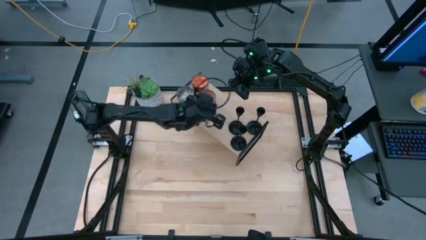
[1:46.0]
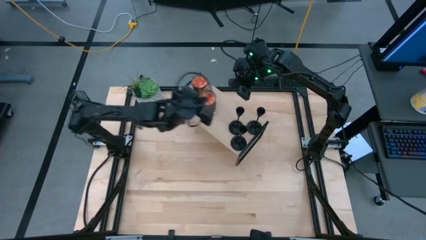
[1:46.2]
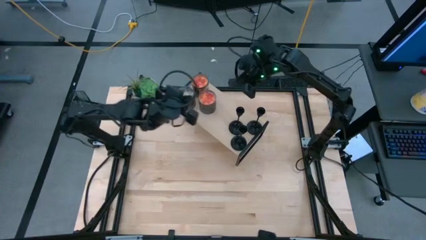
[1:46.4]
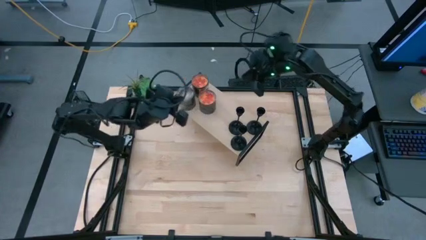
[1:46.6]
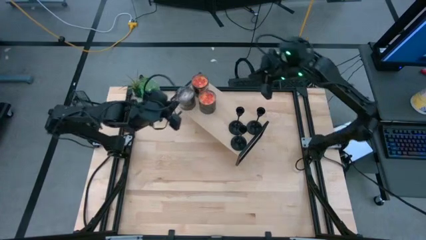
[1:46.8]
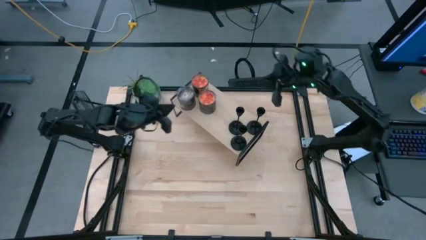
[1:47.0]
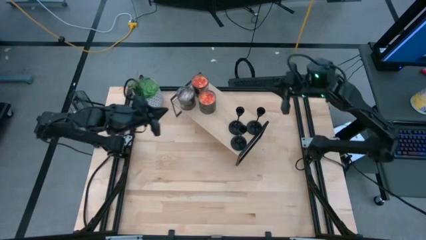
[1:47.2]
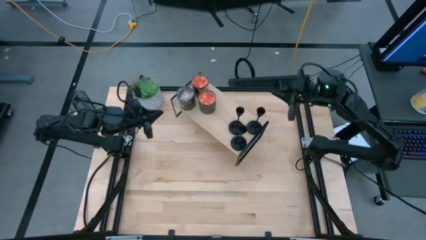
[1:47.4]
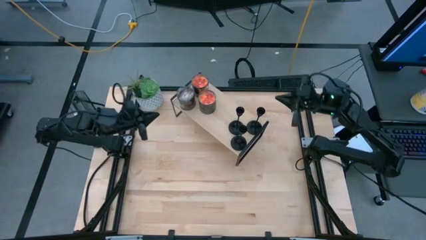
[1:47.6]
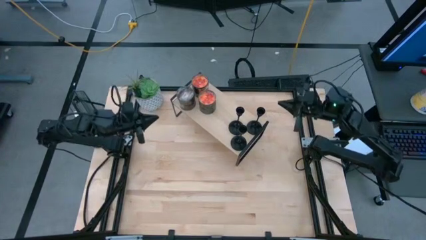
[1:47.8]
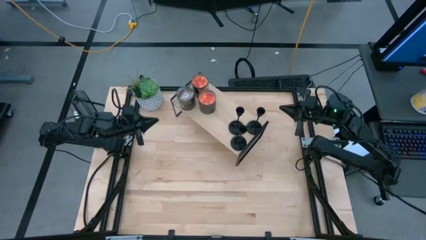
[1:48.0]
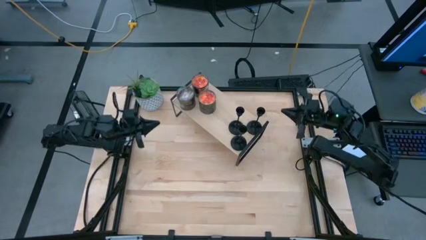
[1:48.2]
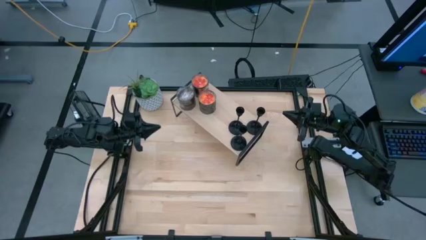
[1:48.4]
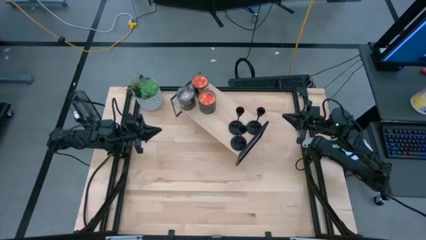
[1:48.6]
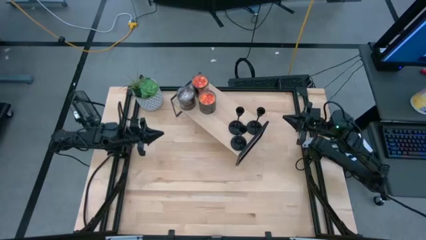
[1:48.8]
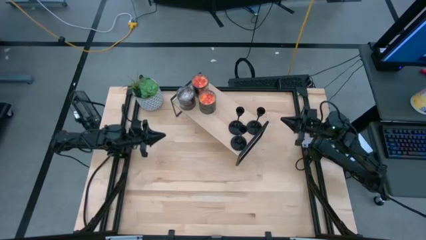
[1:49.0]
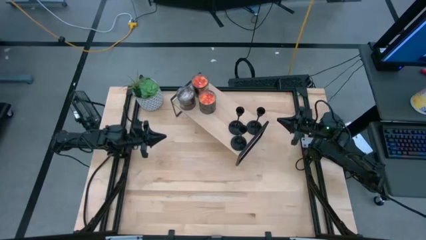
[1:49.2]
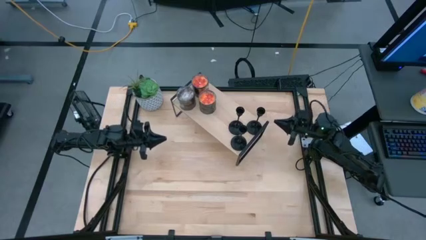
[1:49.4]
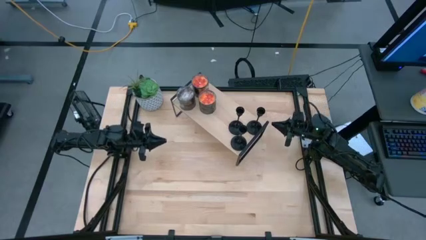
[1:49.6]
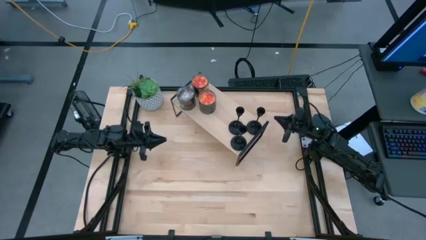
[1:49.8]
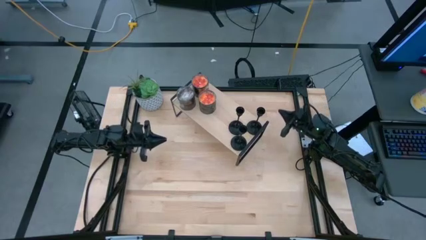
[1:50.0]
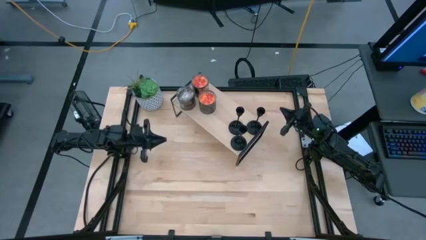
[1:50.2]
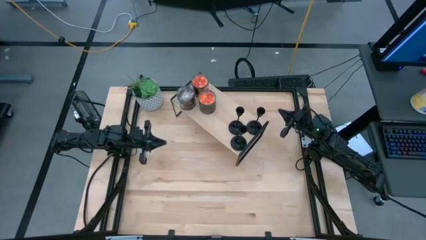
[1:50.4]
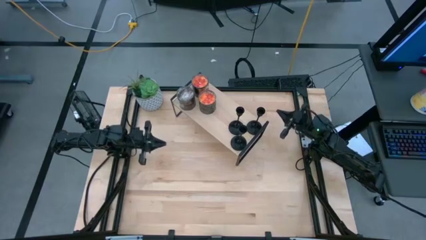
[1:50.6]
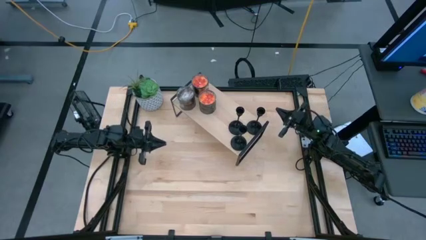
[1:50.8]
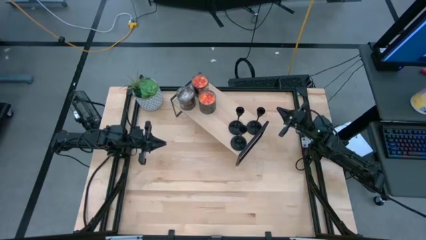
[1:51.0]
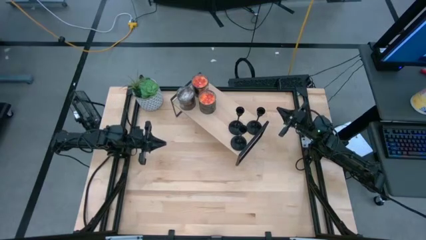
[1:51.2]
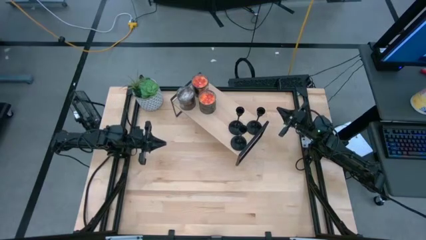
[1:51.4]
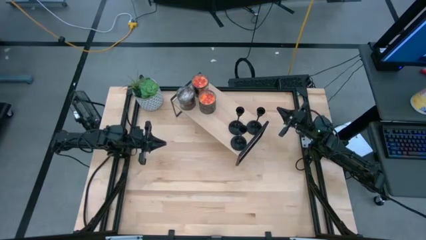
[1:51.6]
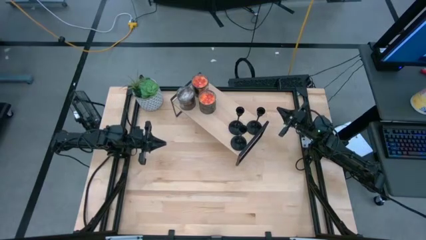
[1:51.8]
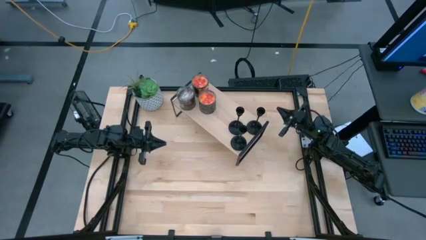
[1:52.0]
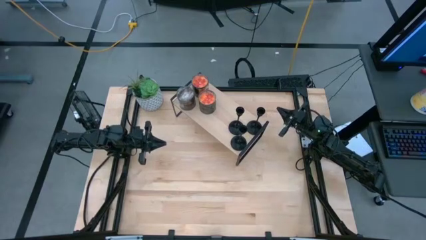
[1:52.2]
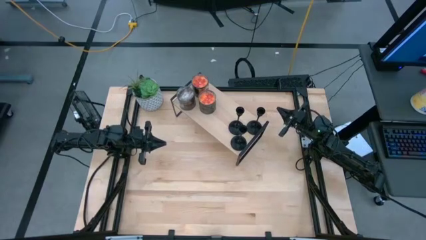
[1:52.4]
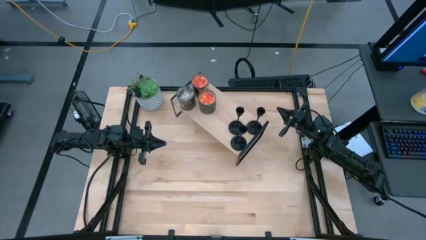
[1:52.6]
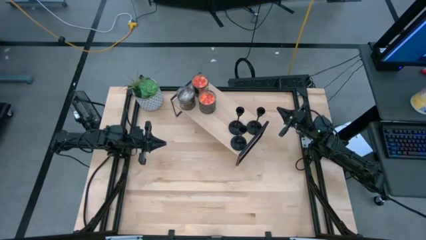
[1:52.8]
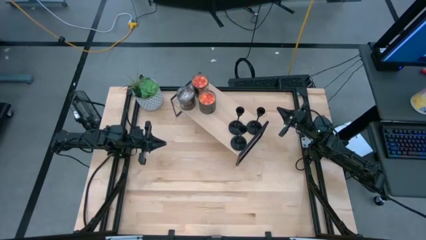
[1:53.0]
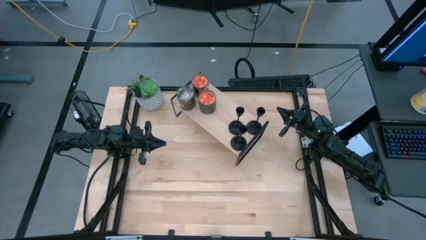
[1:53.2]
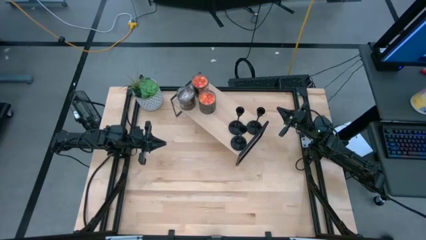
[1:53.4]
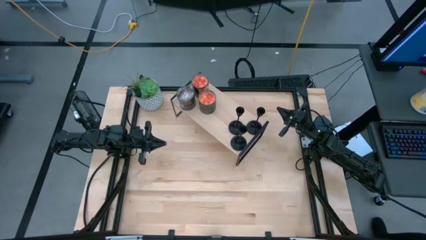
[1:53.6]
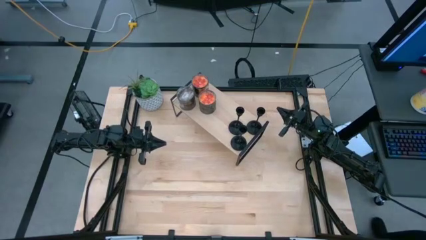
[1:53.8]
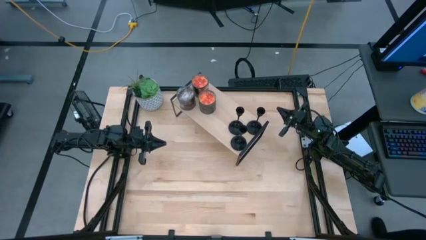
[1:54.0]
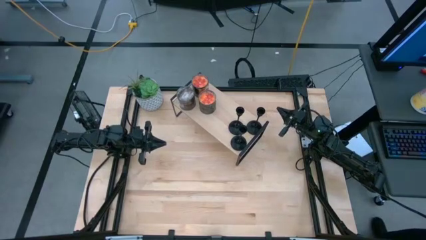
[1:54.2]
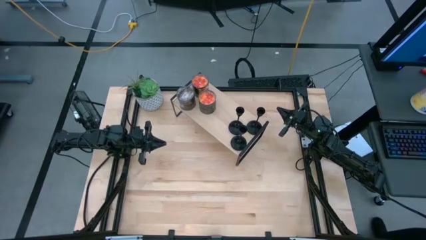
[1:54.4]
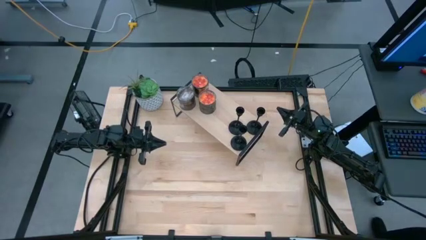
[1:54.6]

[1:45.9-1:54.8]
Task: Pick & Place candle stick holders
Return to Home Position

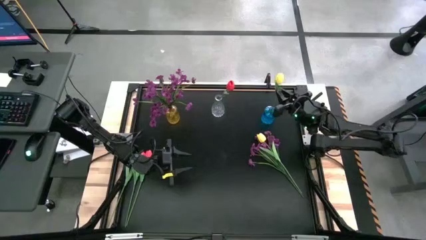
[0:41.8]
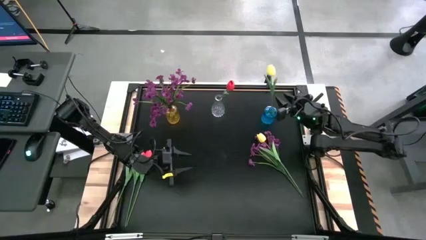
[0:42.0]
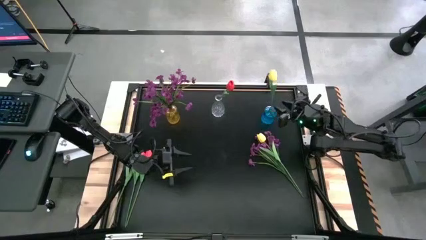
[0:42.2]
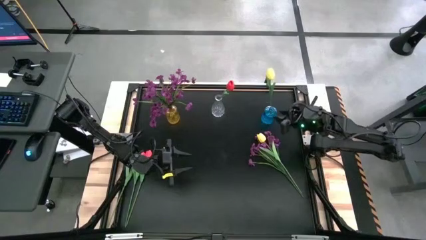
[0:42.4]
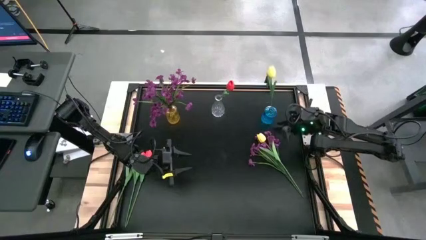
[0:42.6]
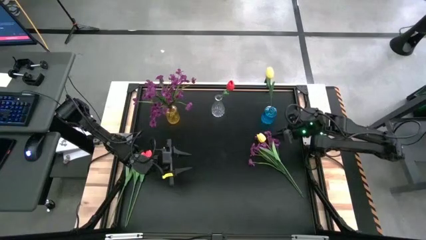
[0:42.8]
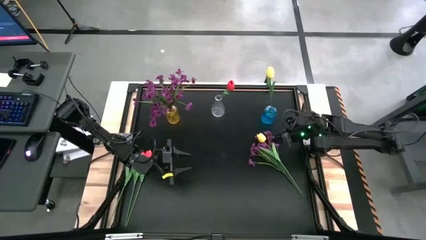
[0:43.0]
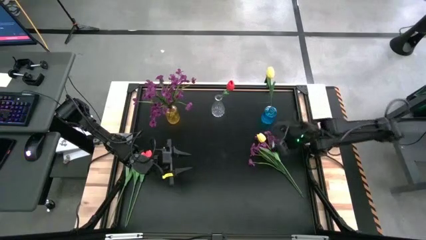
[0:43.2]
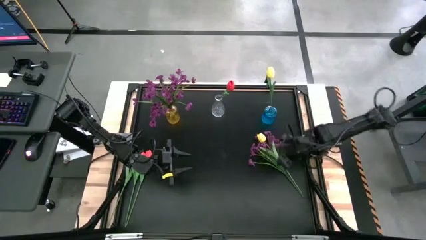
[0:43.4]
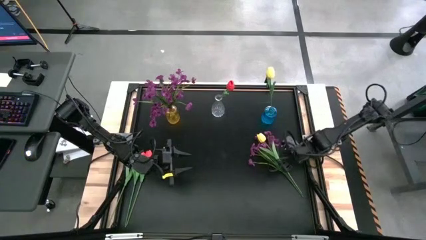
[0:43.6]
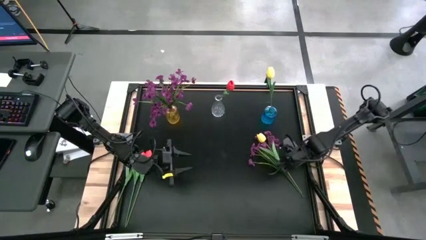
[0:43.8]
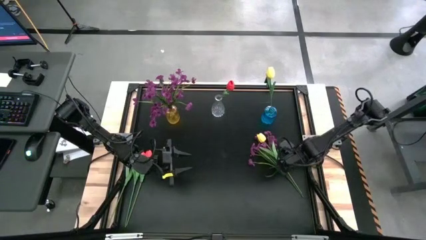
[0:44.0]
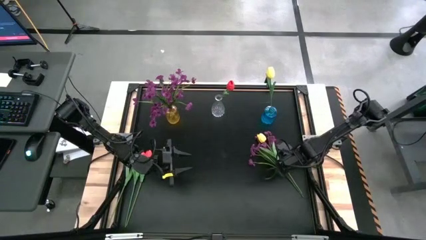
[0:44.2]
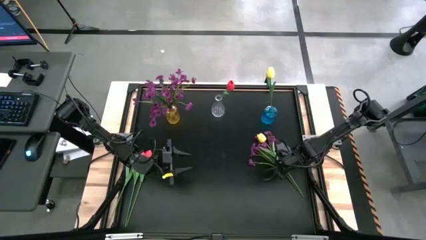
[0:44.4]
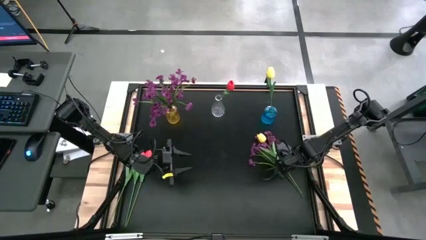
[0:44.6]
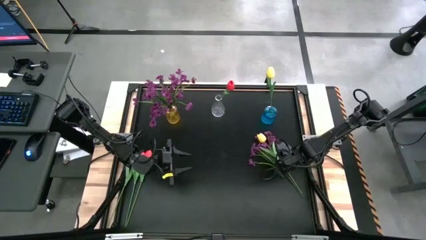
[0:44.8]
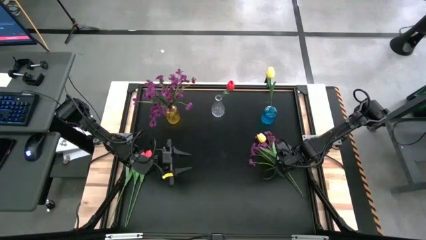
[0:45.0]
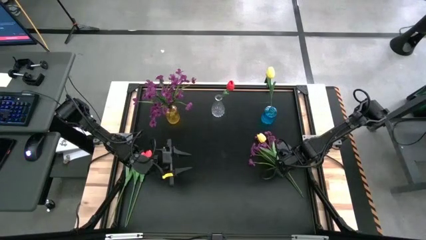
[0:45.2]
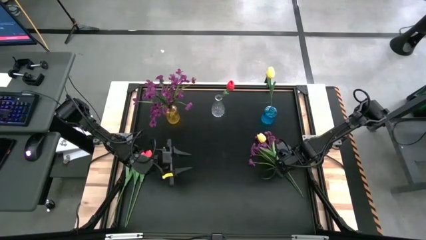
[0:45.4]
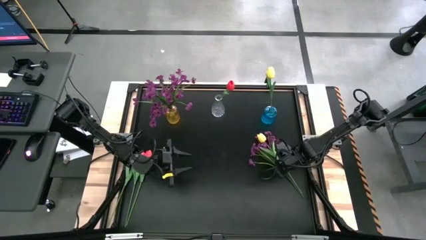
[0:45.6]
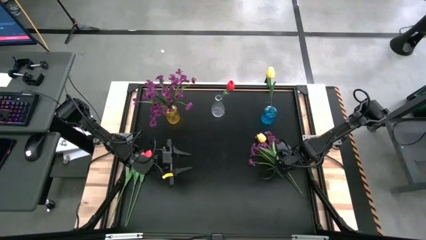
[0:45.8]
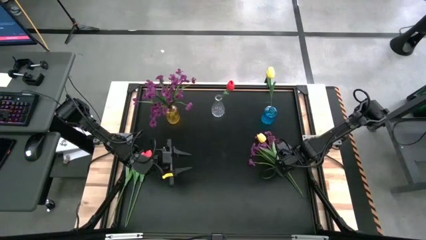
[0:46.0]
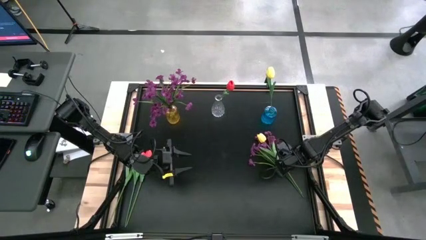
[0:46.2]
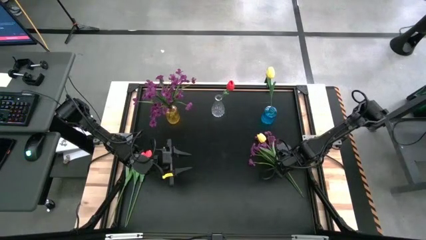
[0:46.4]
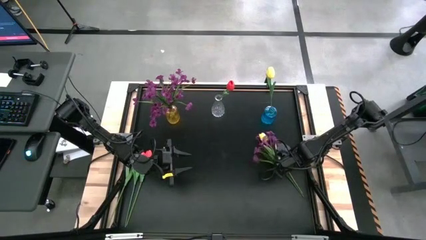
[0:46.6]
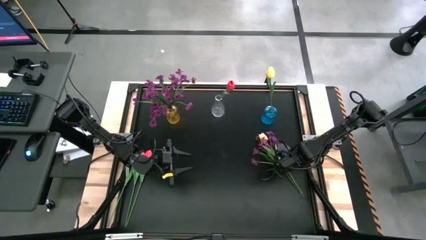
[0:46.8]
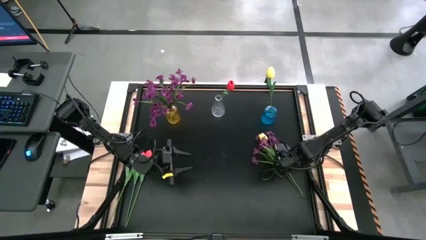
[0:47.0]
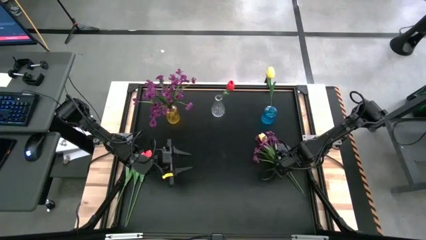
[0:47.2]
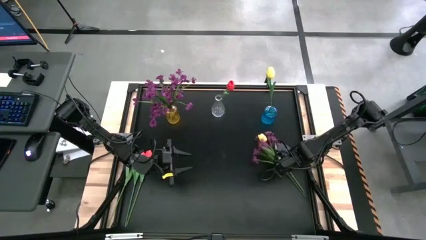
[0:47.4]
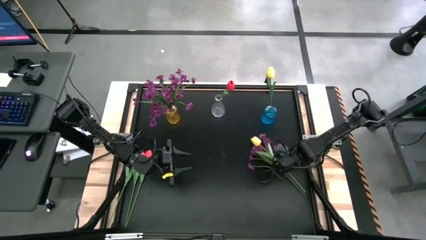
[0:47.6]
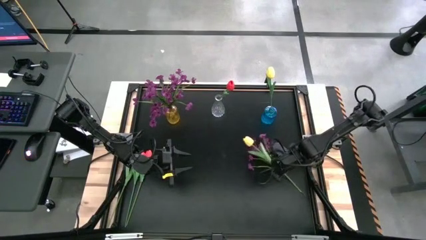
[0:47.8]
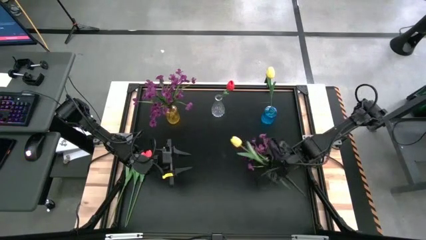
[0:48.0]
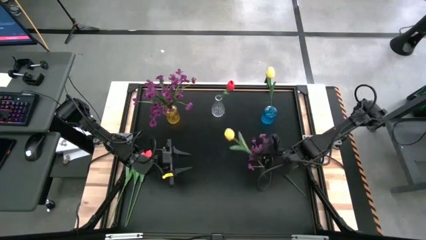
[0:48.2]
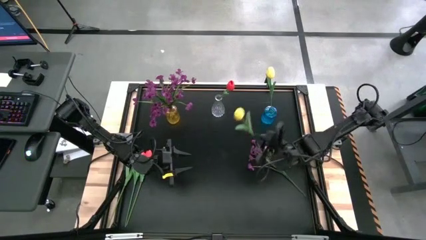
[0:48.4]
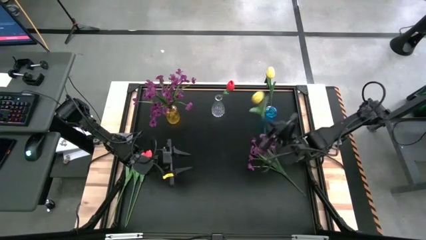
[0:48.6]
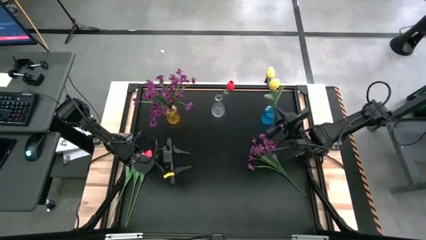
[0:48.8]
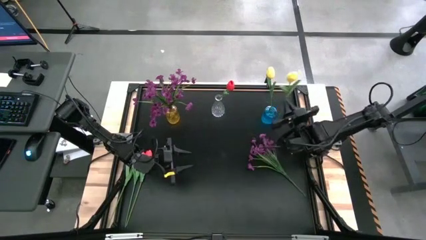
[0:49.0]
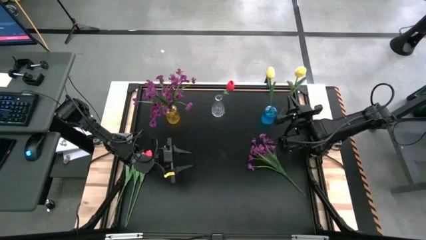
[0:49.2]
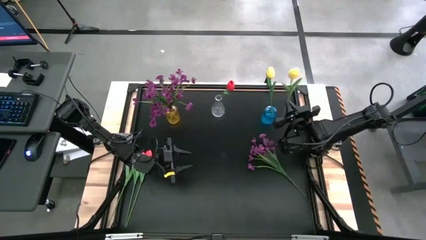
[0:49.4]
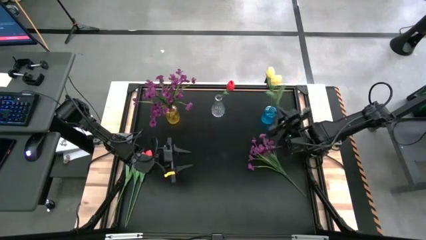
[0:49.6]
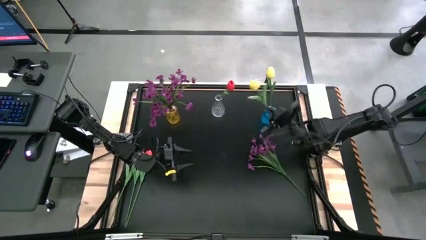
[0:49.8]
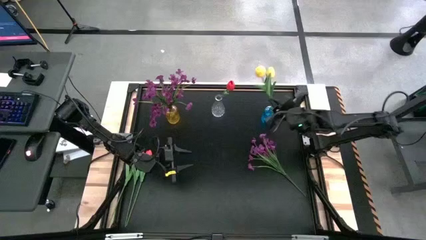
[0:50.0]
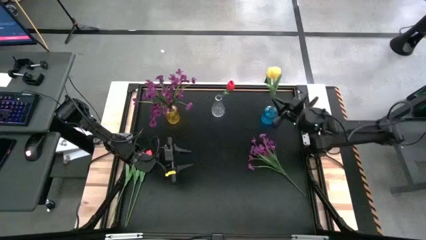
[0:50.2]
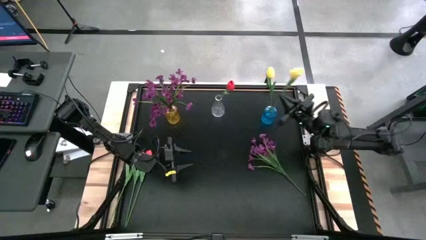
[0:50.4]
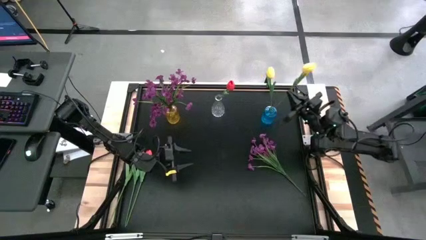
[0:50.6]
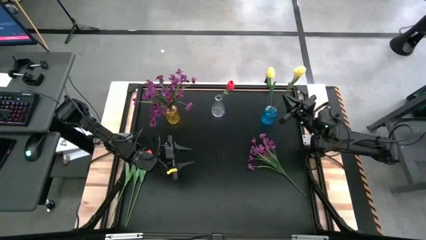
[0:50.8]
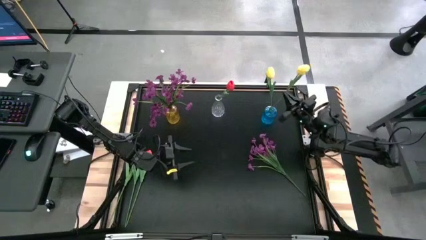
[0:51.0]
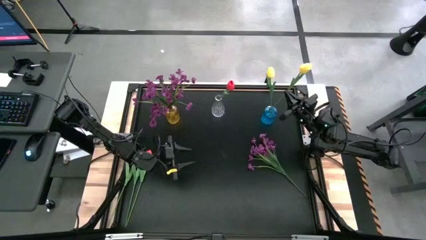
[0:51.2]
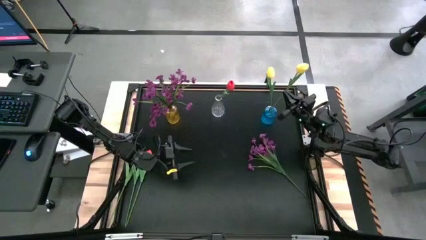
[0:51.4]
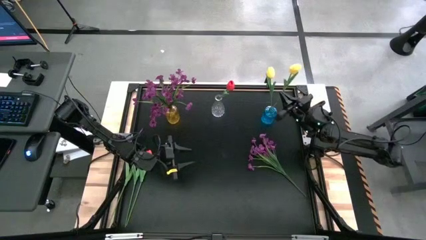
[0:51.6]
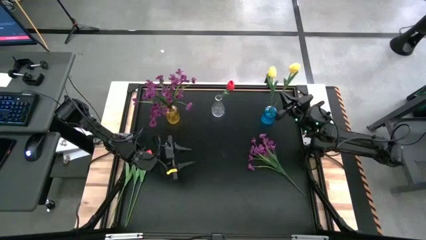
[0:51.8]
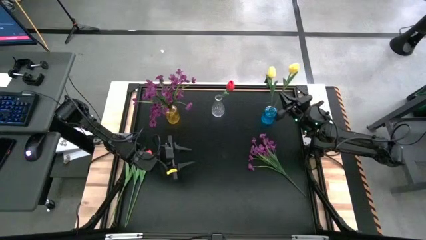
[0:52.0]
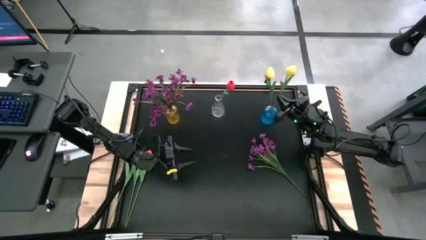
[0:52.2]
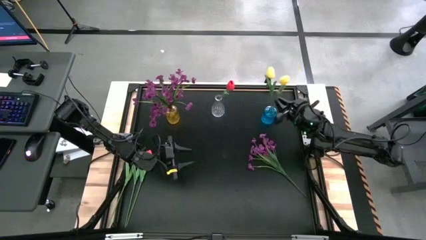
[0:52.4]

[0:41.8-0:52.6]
Task: Sort flowers into vase by color
Put the right yellow flower into the blue flower vase
